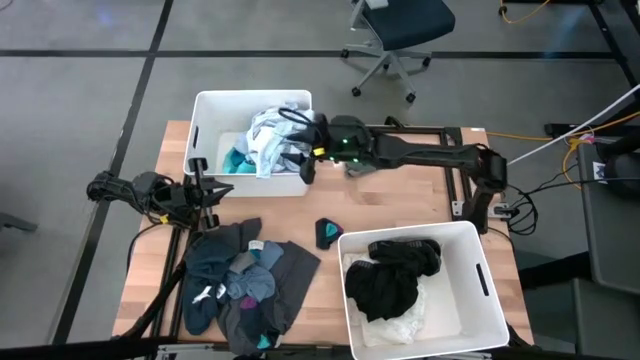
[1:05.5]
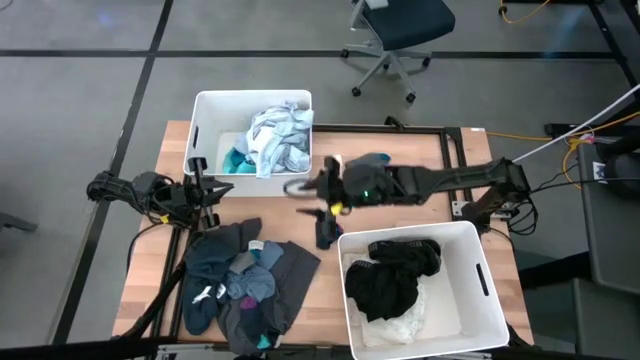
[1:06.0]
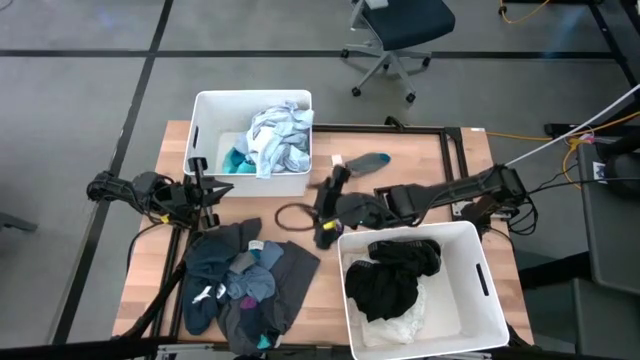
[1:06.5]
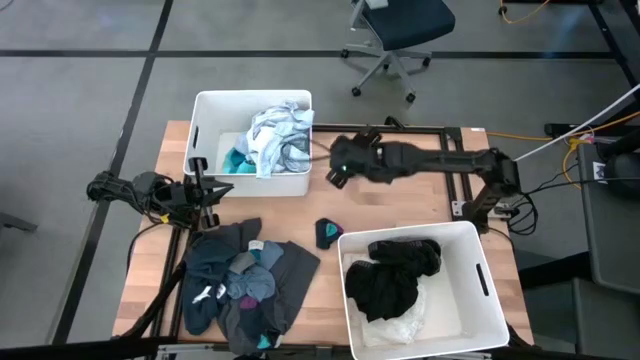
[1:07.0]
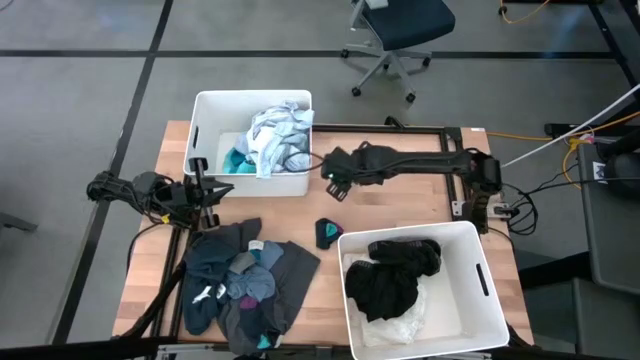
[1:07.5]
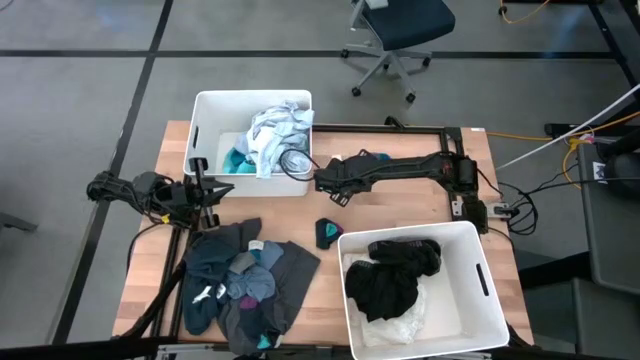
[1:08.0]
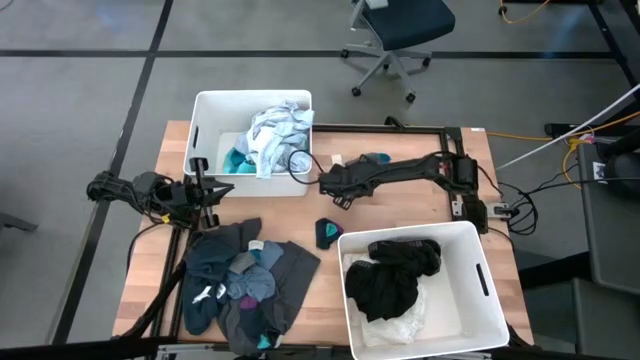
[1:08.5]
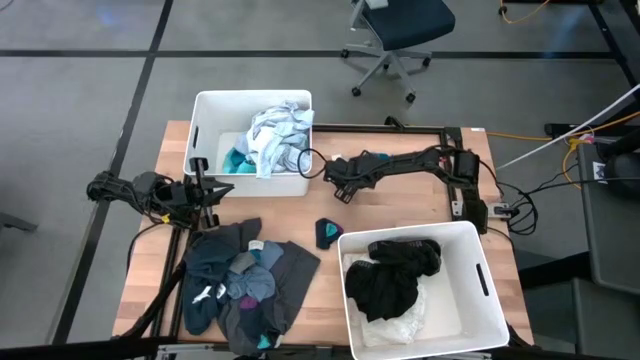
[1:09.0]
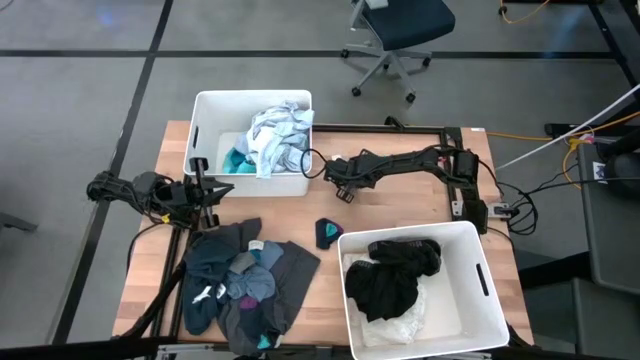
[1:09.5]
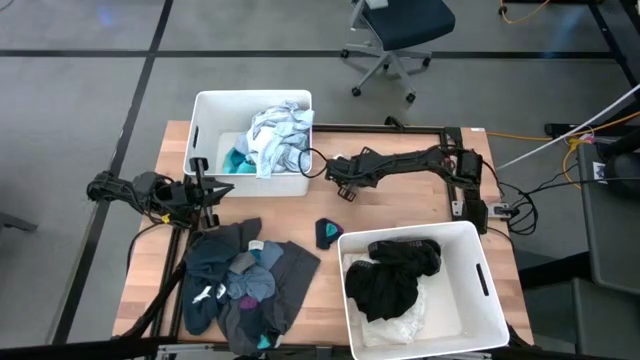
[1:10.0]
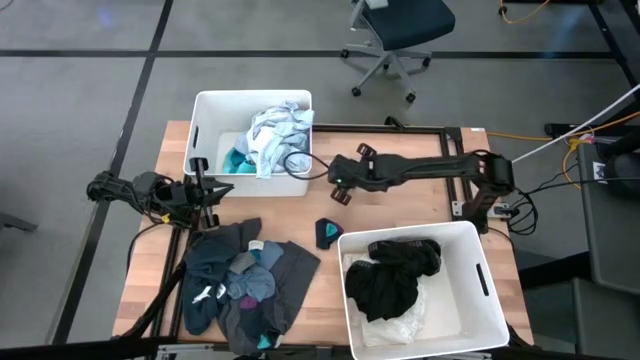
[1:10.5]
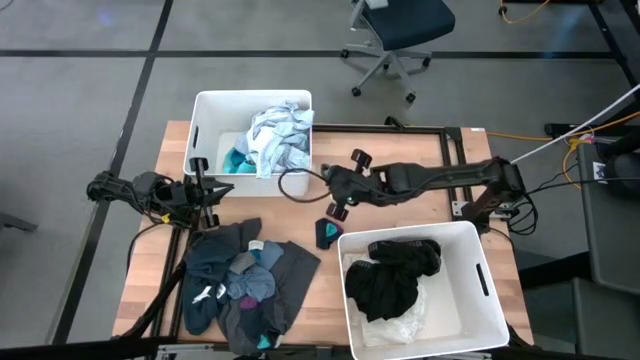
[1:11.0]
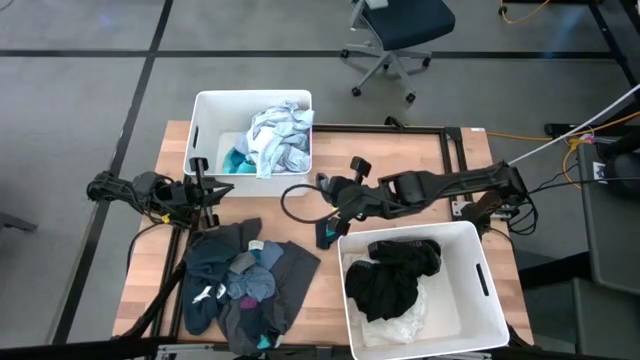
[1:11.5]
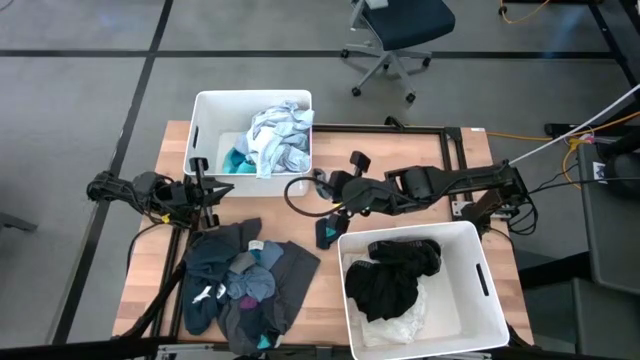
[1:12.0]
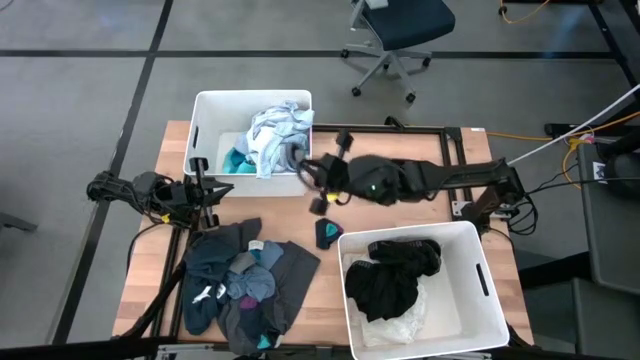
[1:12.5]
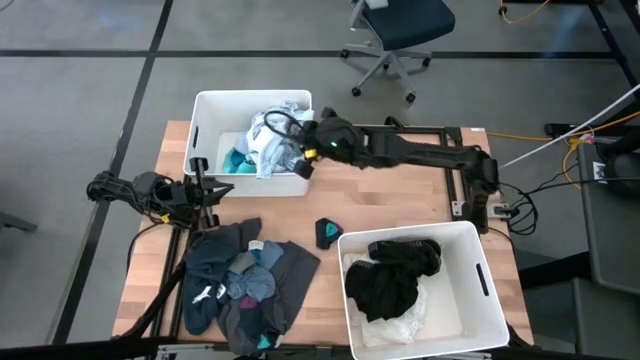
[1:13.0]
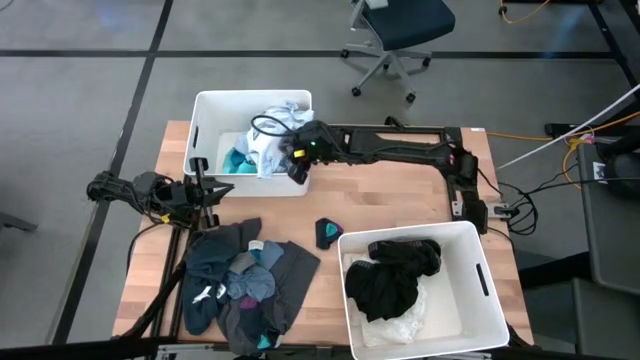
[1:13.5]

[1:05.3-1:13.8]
Task: Sort clothes
Put the grey sock into the top white laundry bin

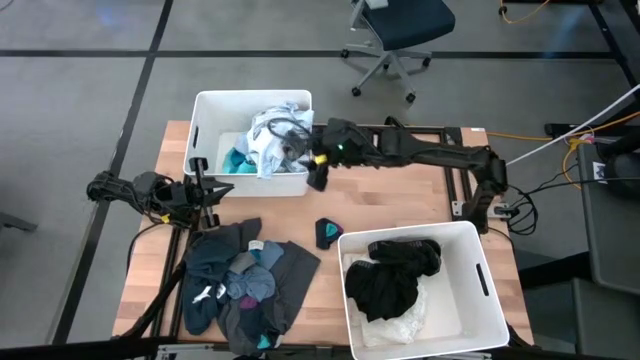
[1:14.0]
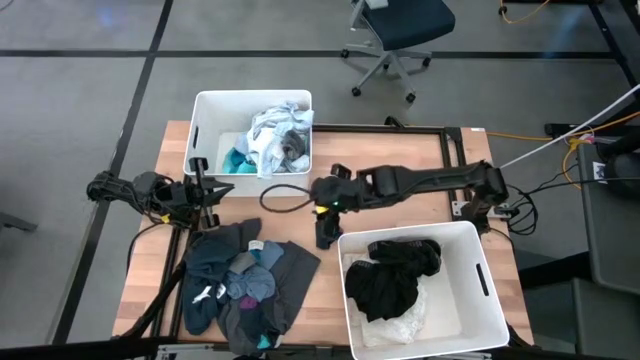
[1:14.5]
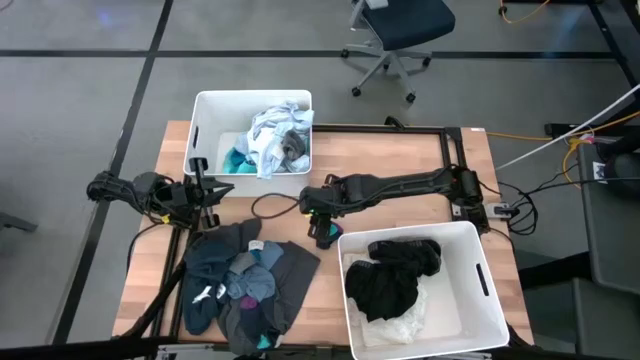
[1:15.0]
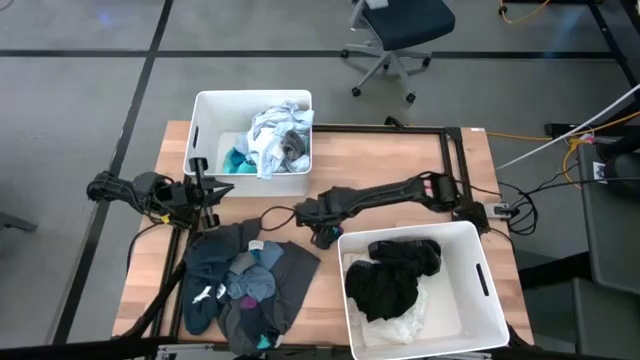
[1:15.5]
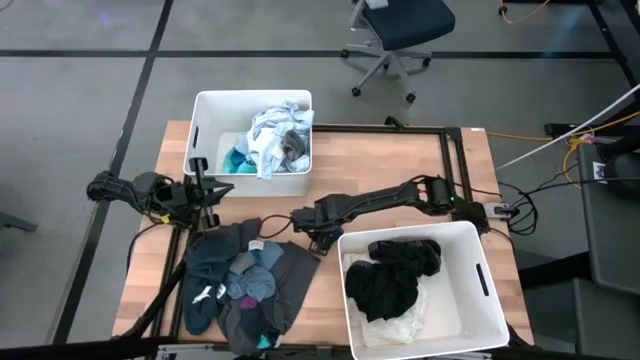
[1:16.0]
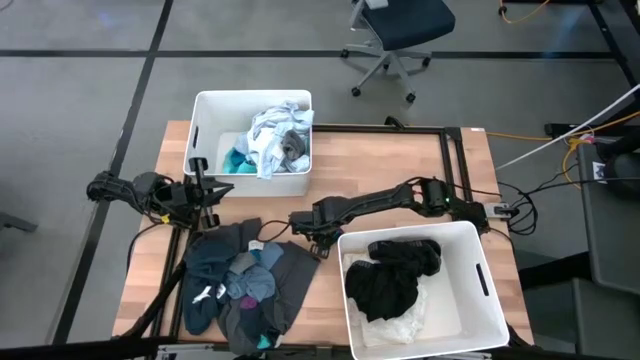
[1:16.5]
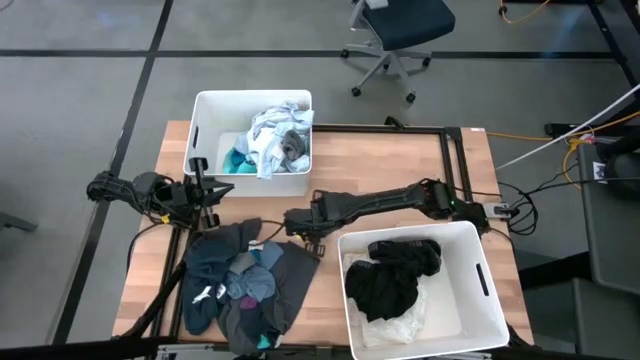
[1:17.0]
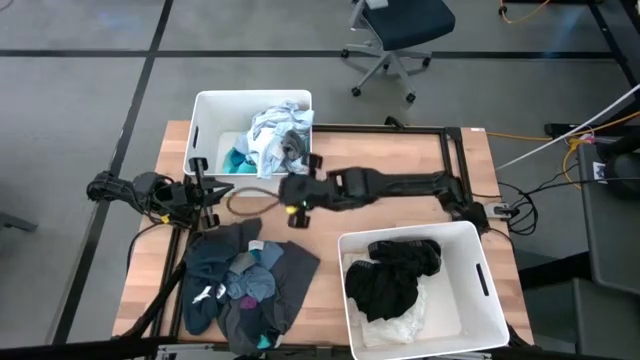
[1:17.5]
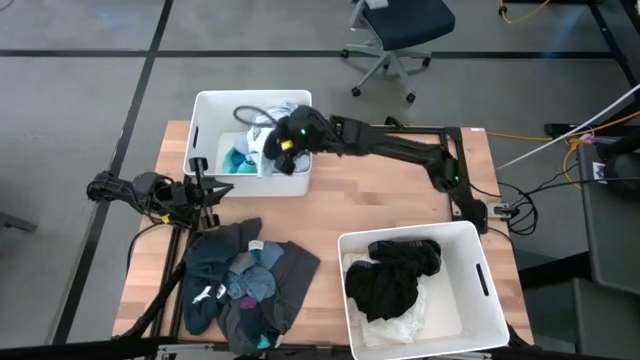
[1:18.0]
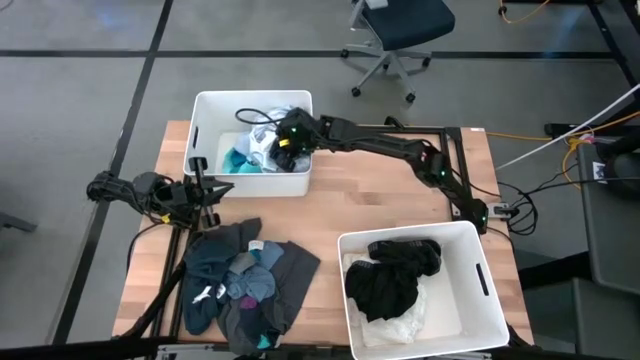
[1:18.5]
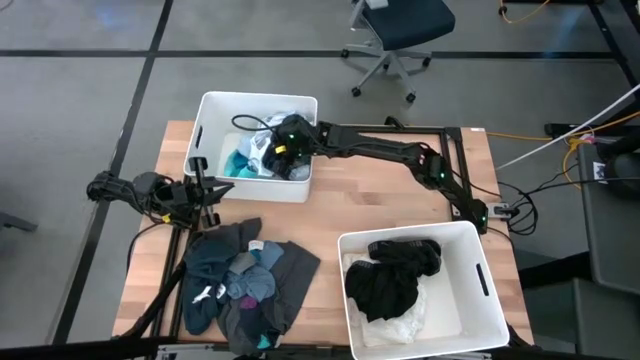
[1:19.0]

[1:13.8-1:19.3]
Put the black sock into the top white laundry bin

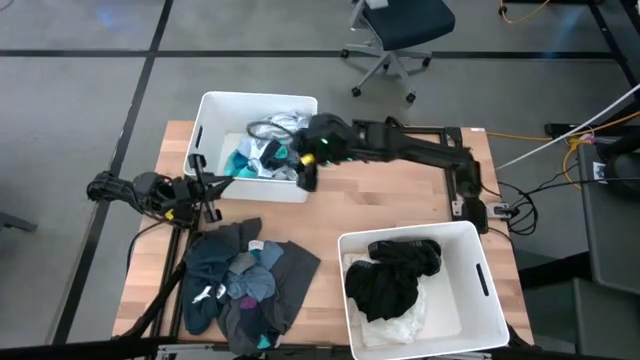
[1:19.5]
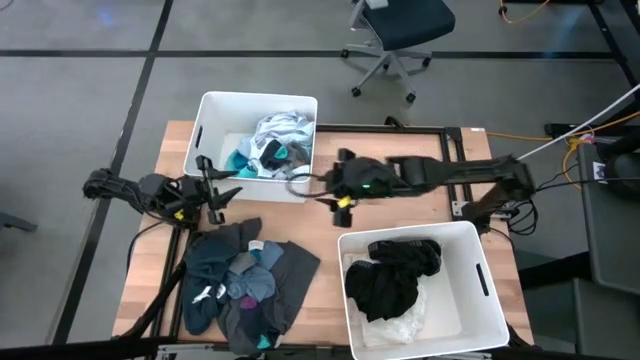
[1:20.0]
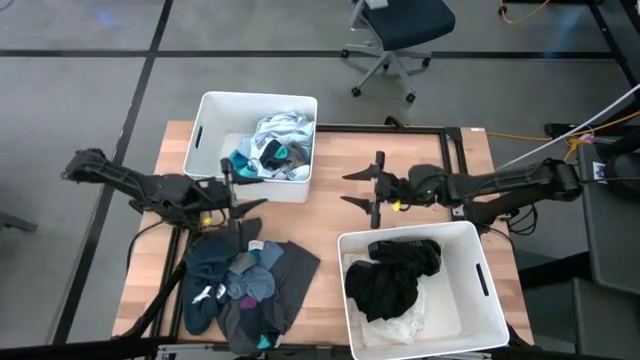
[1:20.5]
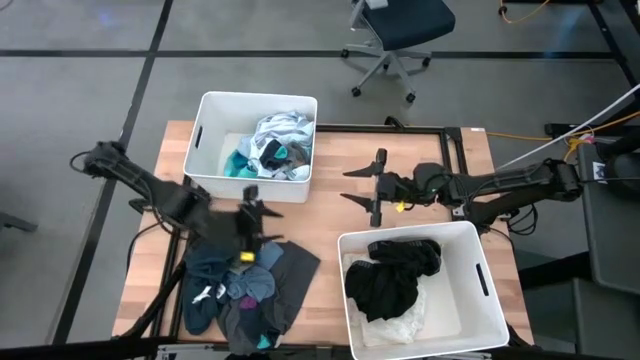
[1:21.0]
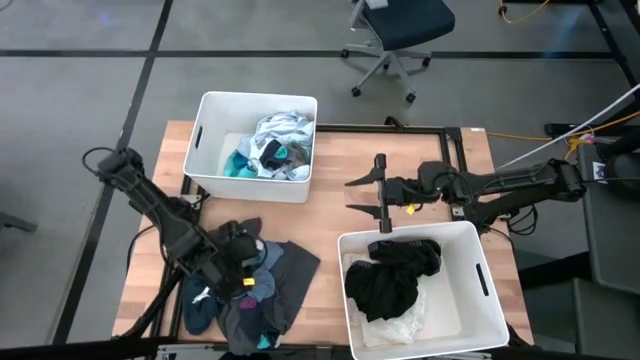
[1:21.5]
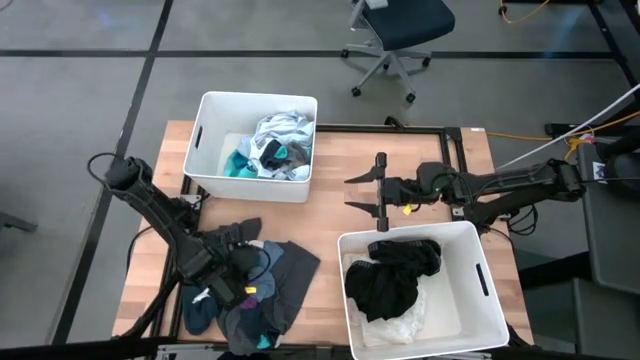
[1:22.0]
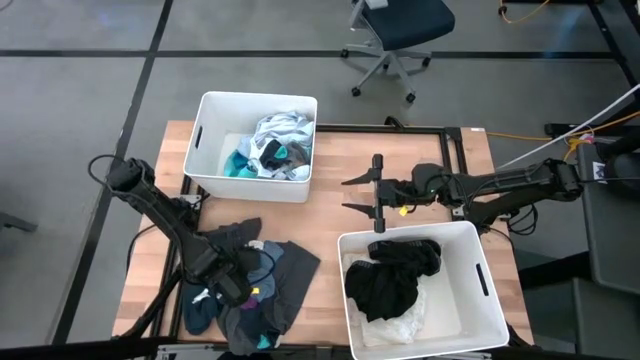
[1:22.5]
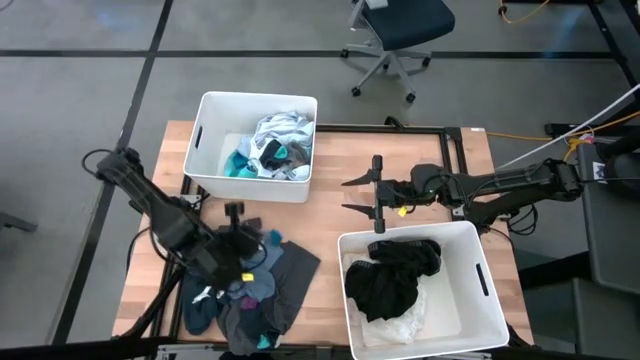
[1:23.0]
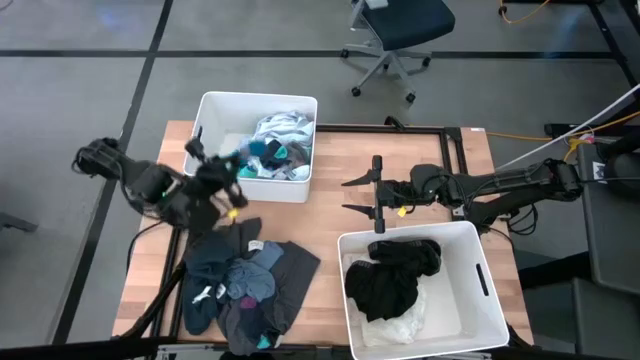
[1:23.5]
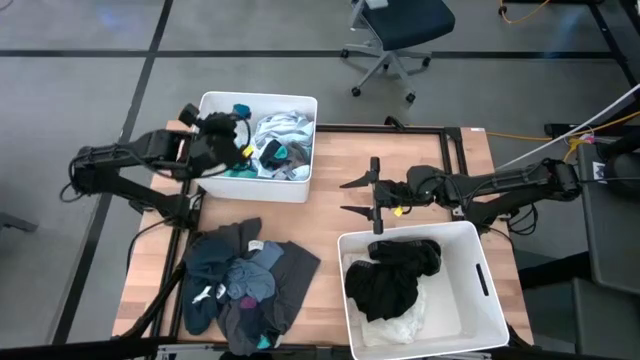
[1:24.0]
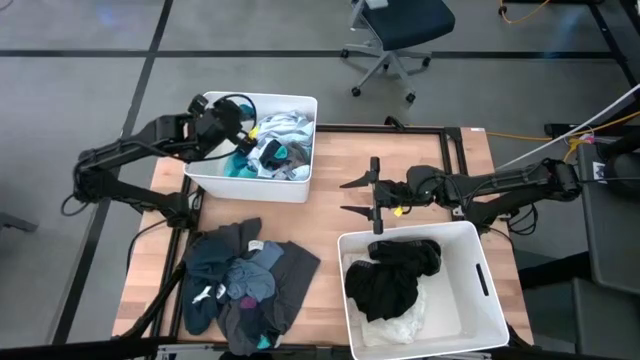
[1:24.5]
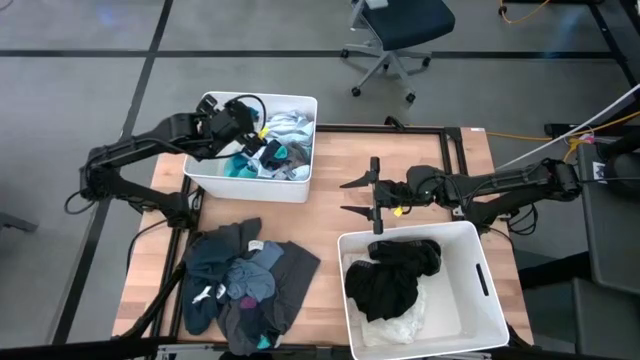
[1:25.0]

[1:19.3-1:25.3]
Put the gray sock into the top white laundry bin
